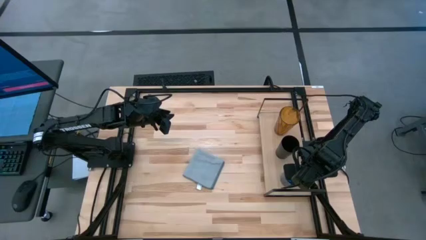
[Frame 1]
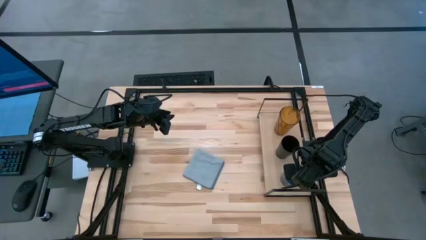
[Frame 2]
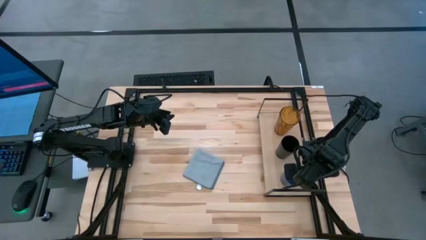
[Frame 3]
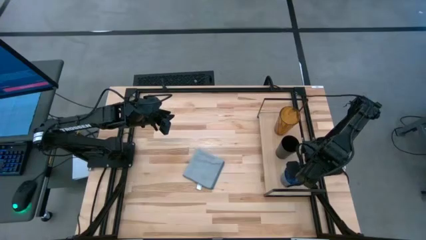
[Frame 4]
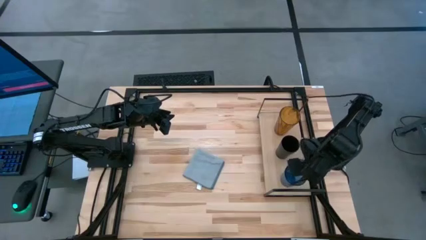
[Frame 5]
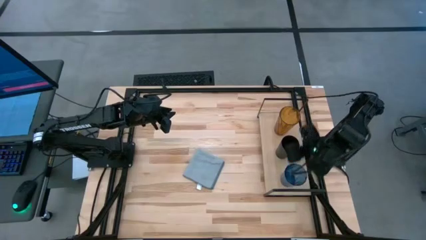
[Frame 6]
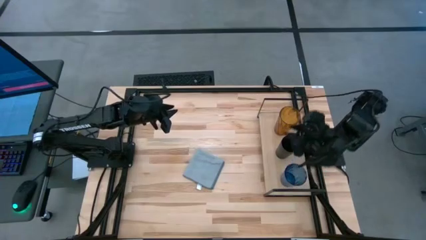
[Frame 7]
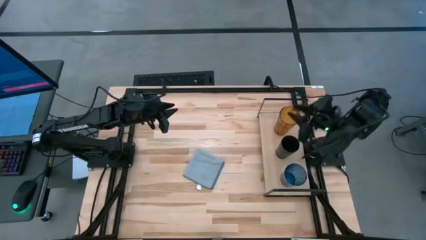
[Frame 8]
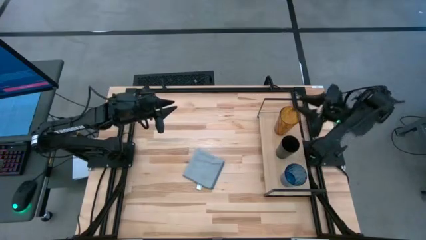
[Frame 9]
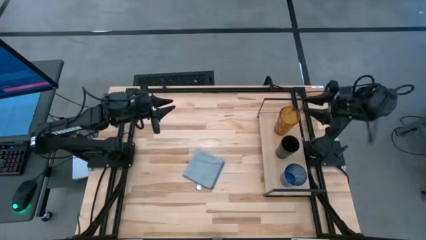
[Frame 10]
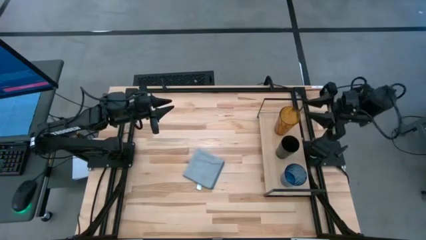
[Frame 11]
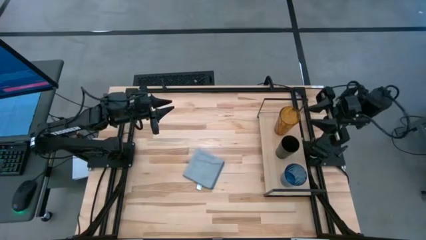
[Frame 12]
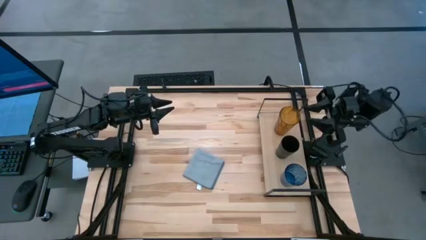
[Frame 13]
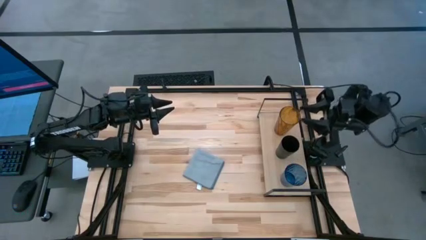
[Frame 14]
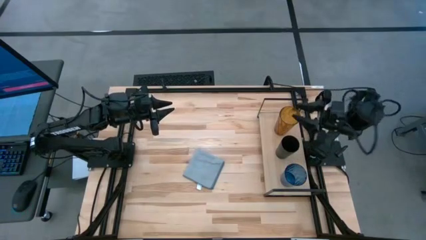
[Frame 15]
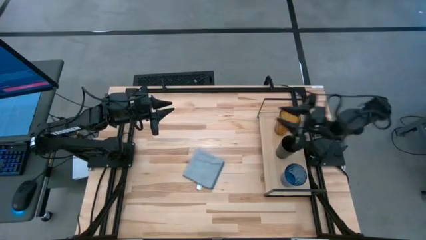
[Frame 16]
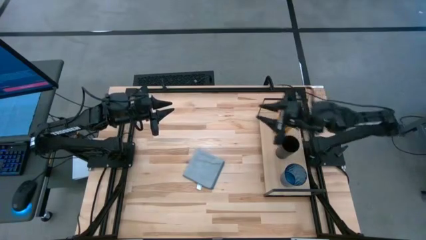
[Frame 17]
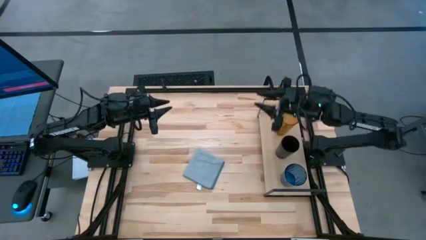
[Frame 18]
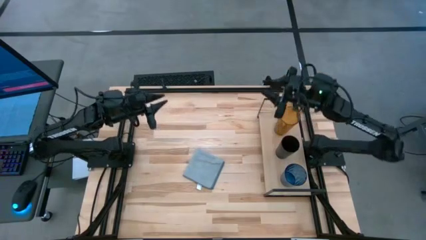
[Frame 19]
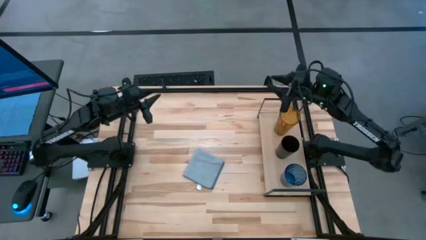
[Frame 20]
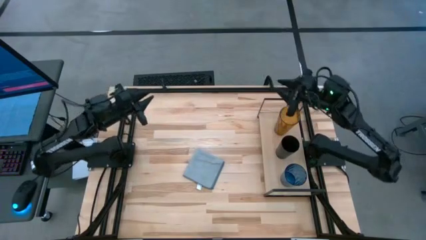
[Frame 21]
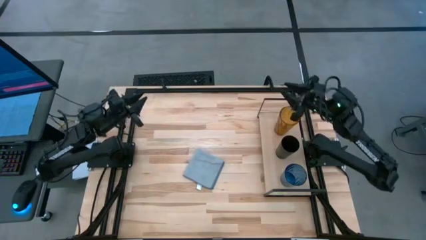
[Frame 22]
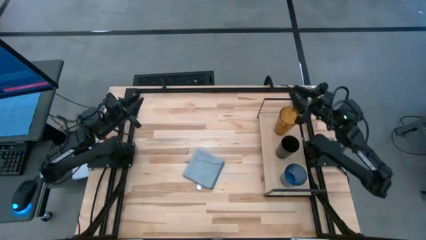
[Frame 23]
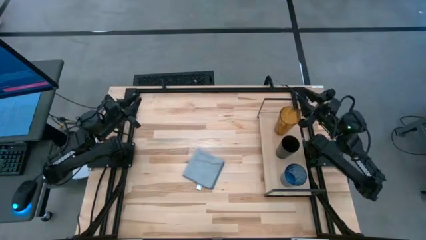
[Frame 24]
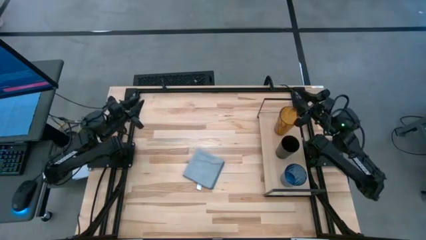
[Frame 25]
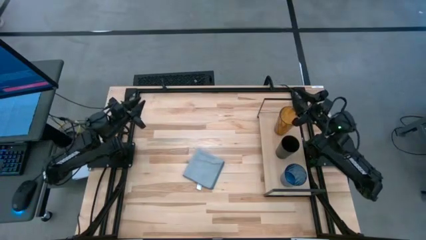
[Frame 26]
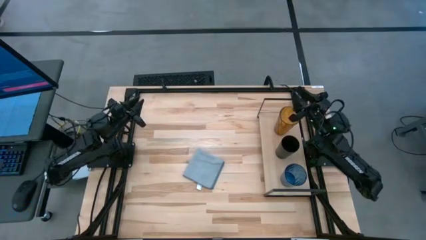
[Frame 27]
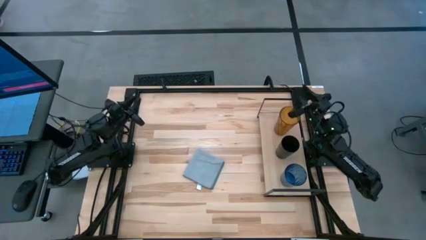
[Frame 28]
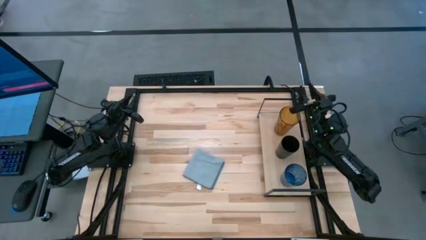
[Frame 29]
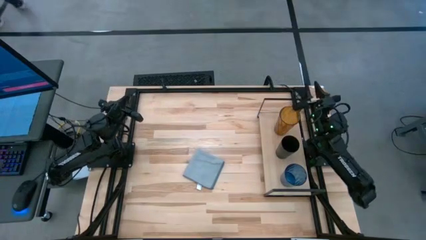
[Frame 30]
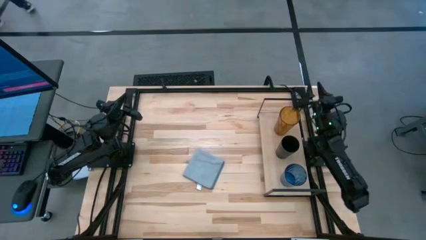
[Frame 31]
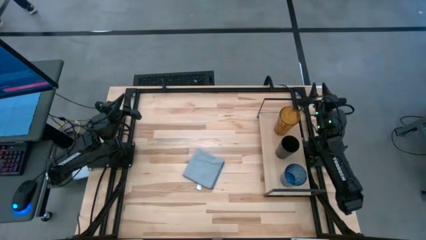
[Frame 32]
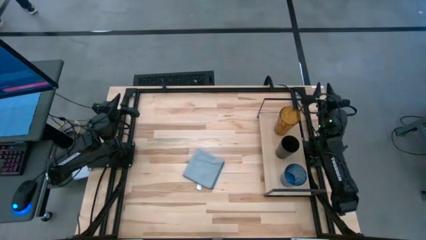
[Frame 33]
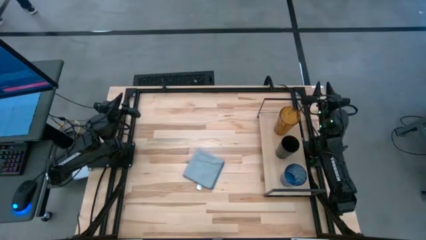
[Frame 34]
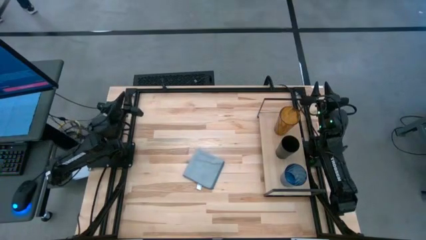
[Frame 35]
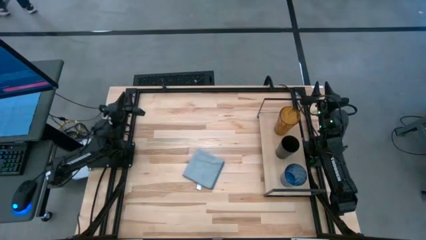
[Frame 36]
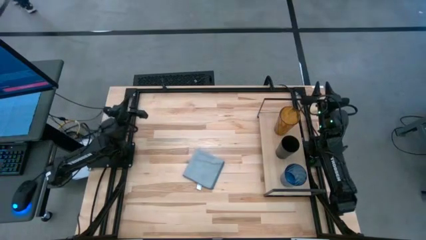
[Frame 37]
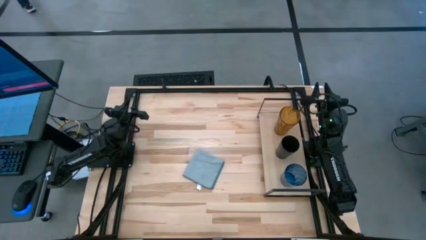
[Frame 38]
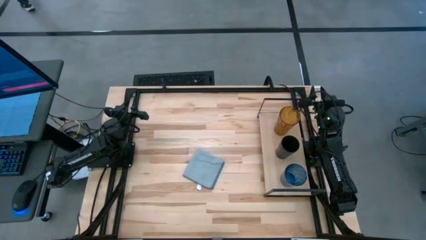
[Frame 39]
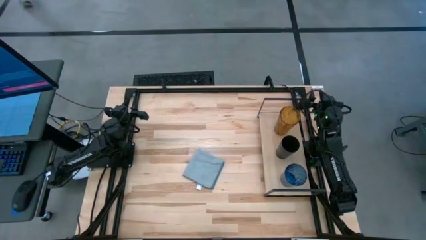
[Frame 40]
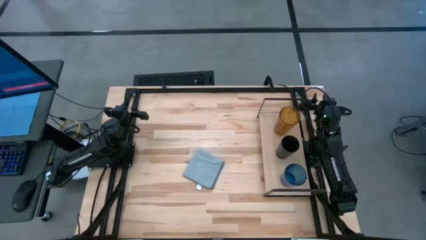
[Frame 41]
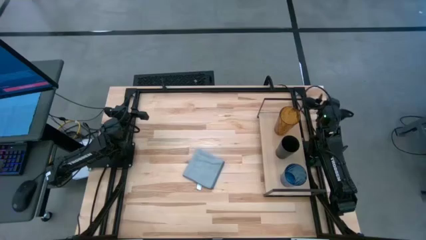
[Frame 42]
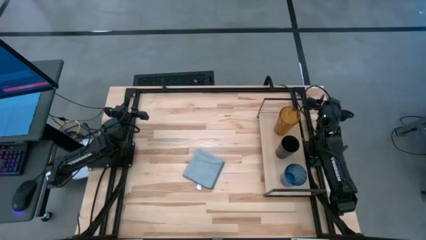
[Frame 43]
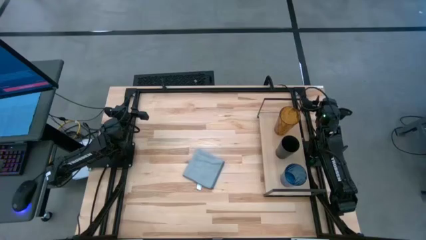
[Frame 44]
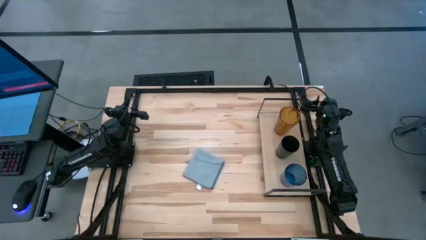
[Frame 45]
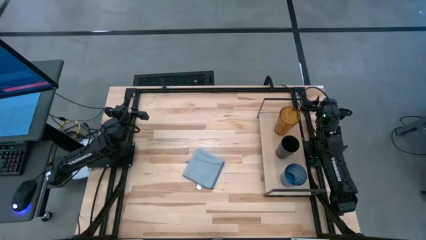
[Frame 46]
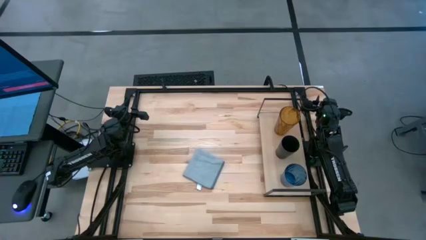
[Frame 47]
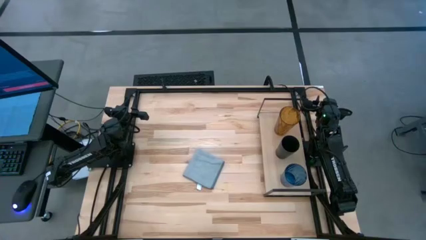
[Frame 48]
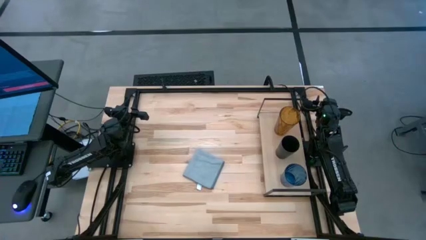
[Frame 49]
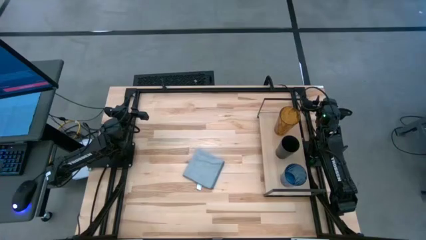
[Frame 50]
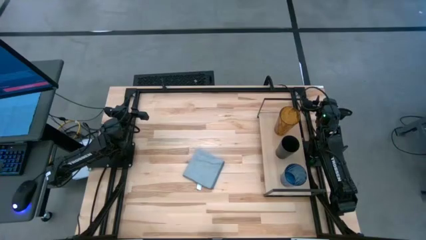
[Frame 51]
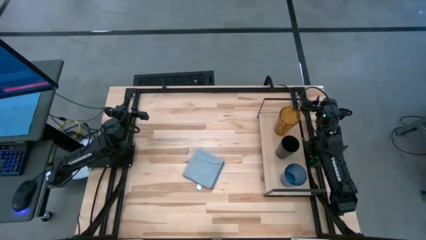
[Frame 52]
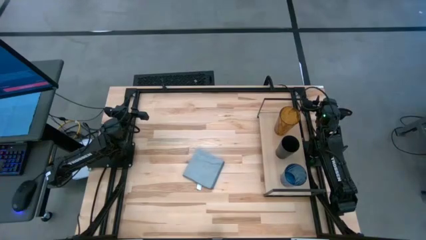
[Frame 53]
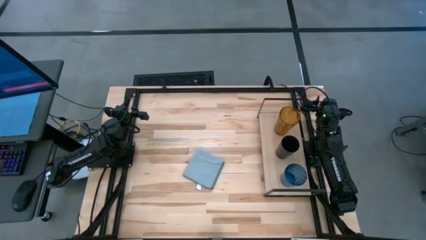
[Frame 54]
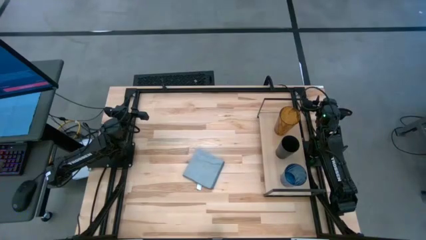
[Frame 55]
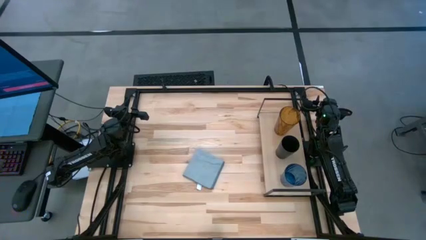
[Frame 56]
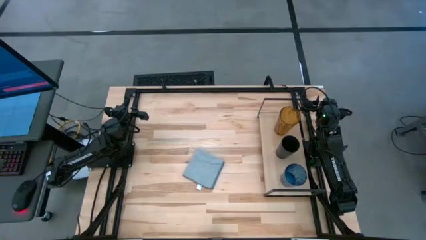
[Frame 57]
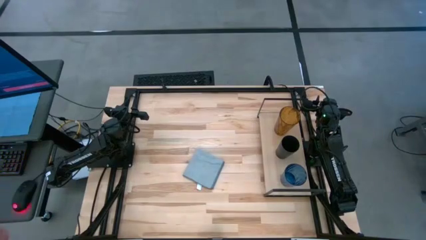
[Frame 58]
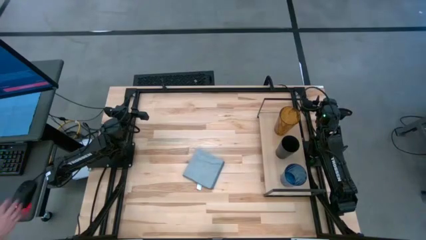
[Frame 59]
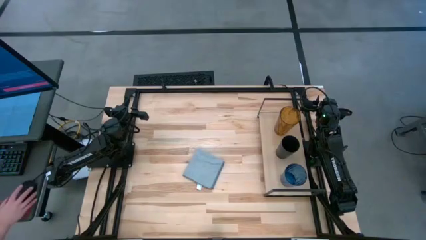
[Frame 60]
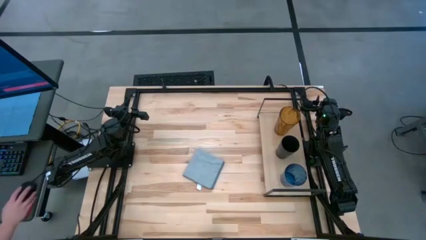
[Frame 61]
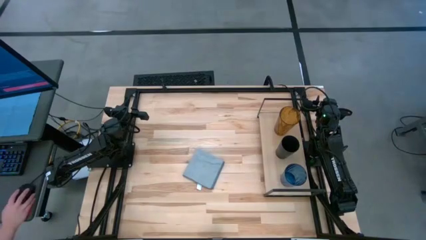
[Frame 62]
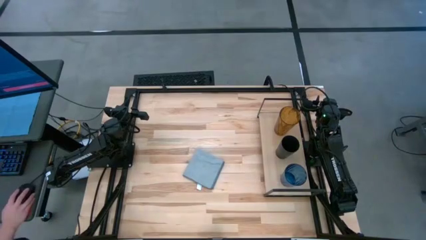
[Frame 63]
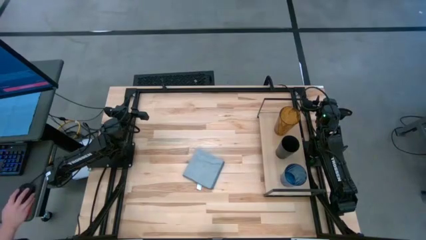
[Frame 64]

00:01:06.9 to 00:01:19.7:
Task: Stack small to large cups/mugs on shelf
Return to Home Position
